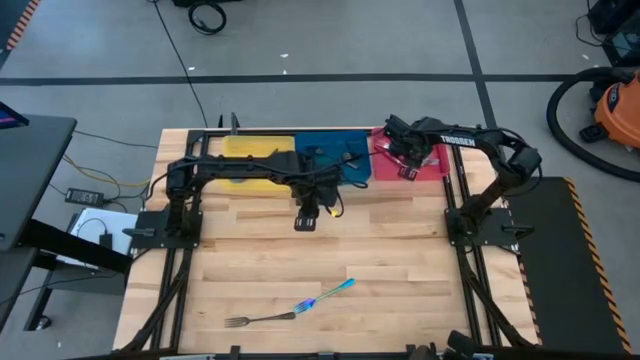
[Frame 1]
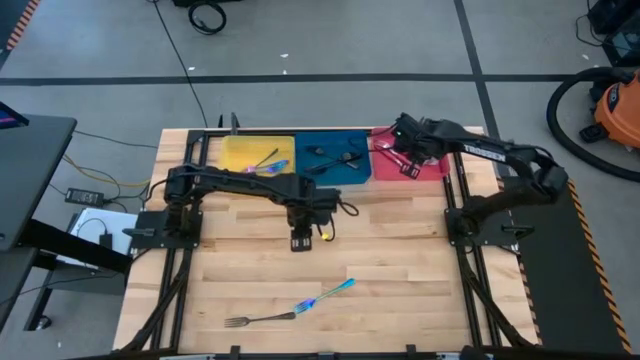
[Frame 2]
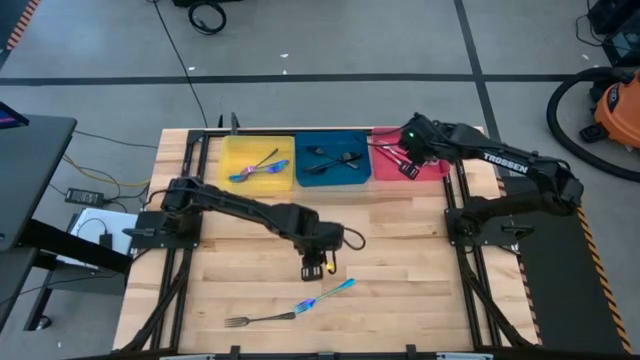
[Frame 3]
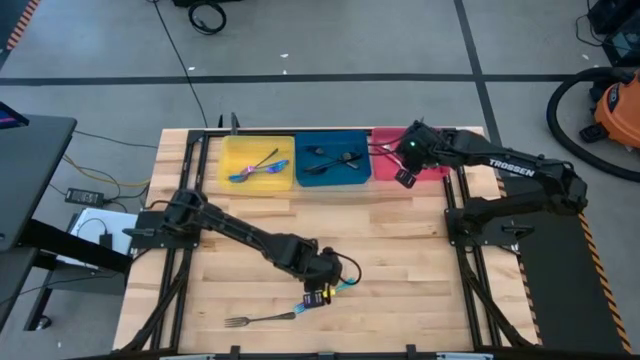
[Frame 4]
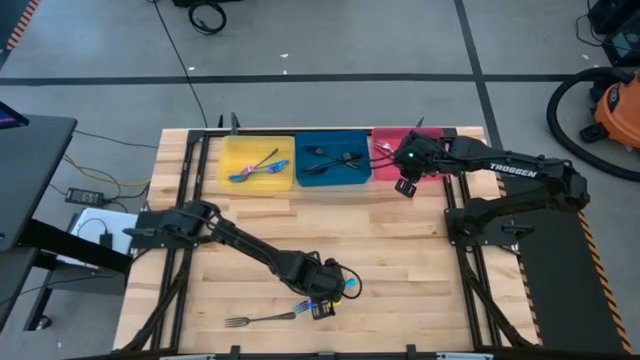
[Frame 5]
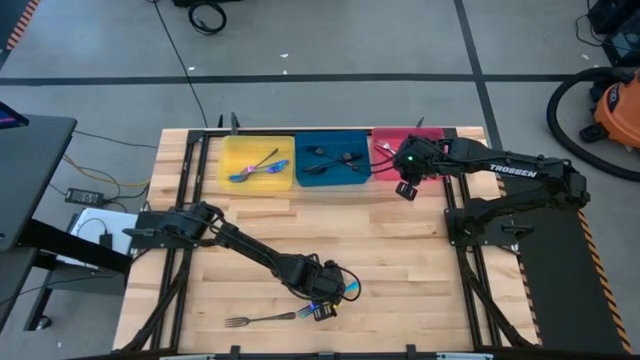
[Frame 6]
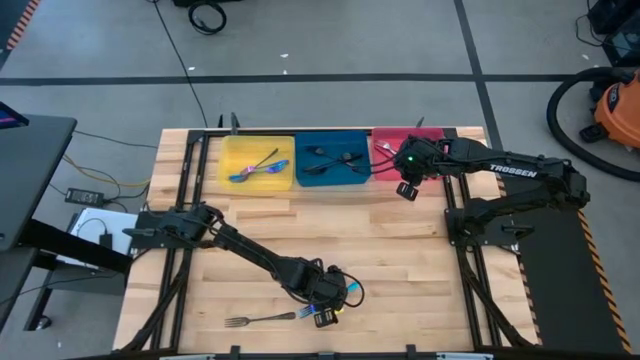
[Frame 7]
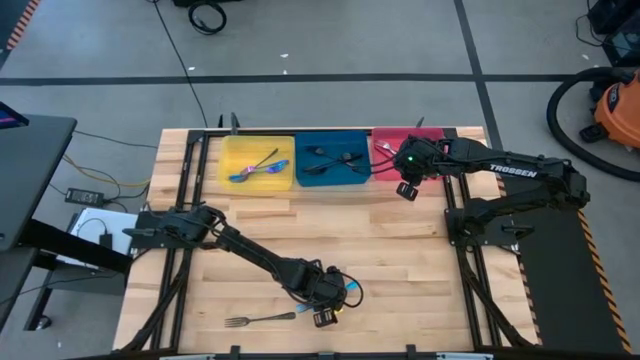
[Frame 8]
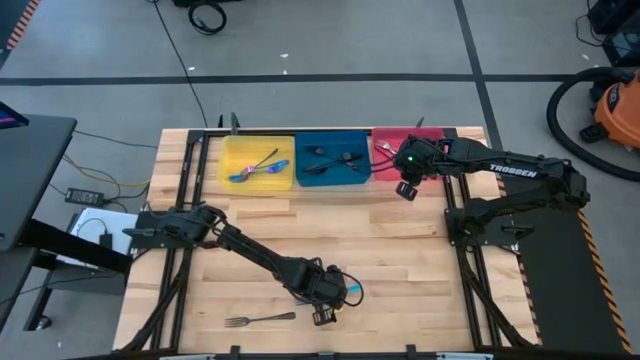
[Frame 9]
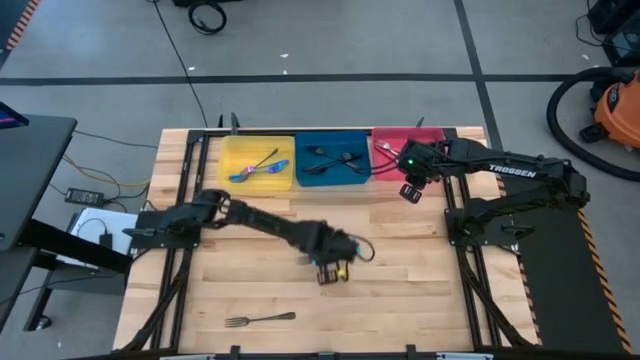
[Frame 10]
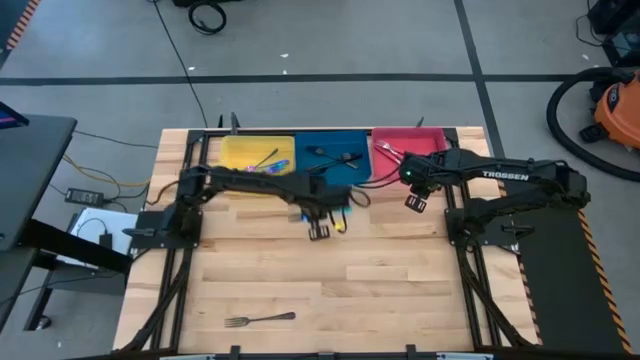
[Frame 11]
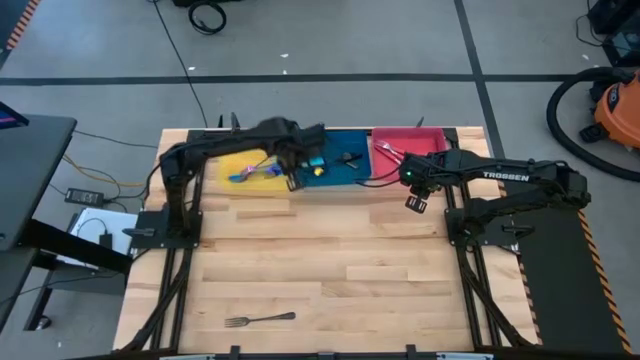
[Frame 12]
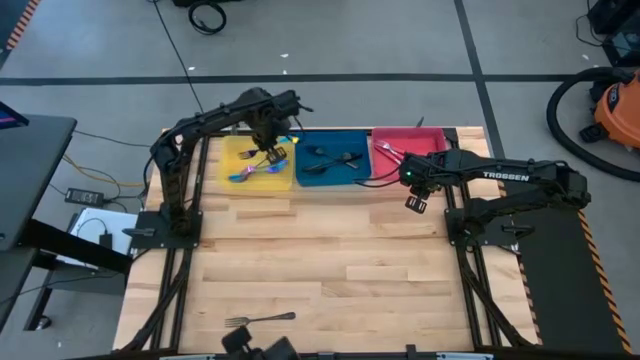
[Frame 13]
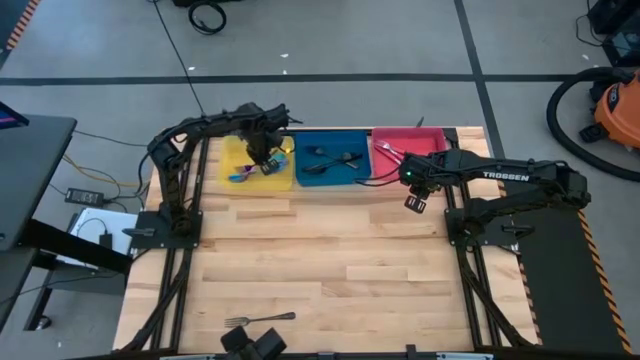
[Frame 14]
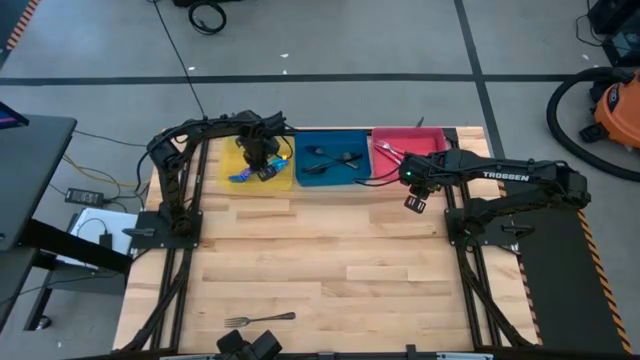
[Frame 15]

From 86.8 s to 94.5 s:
Task: Sort silverware by color (type)
Put the blue fork into the yellow bin

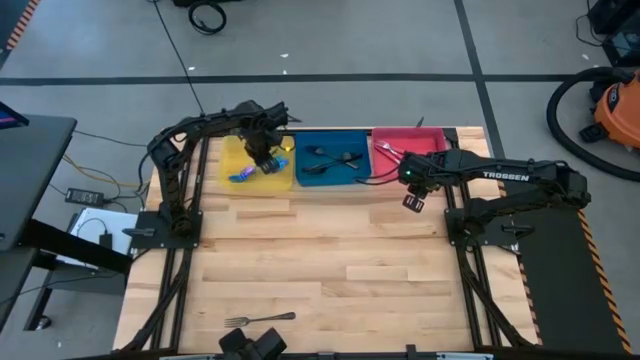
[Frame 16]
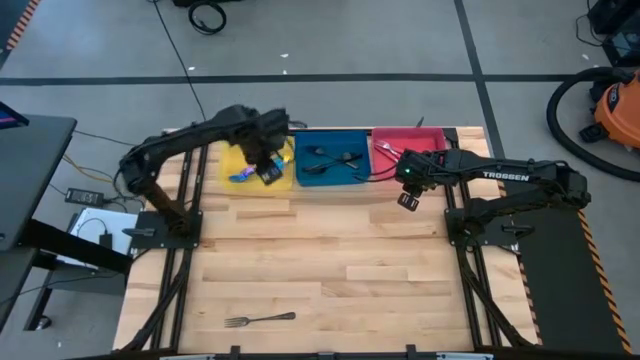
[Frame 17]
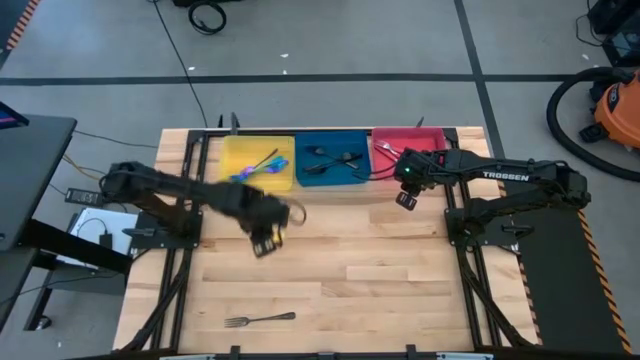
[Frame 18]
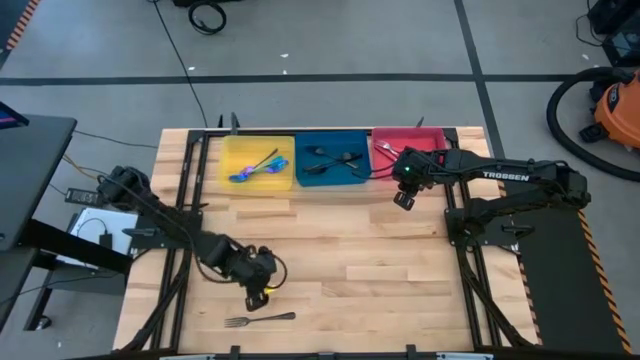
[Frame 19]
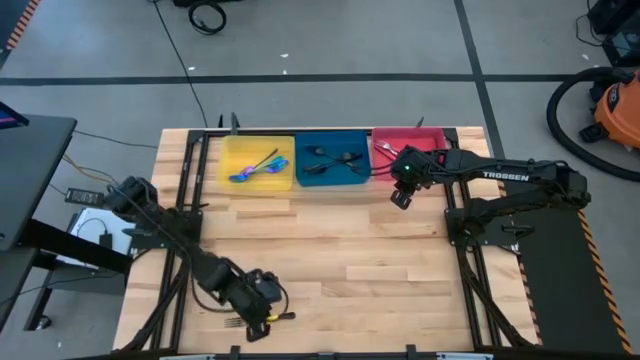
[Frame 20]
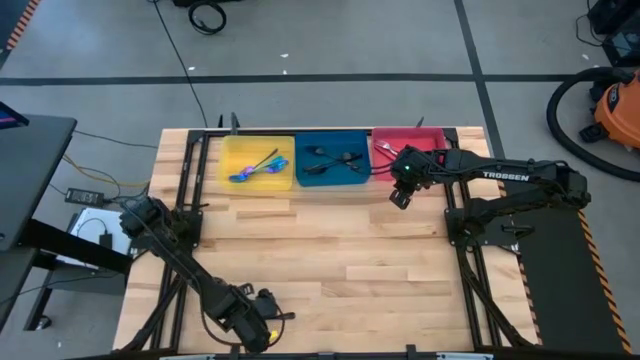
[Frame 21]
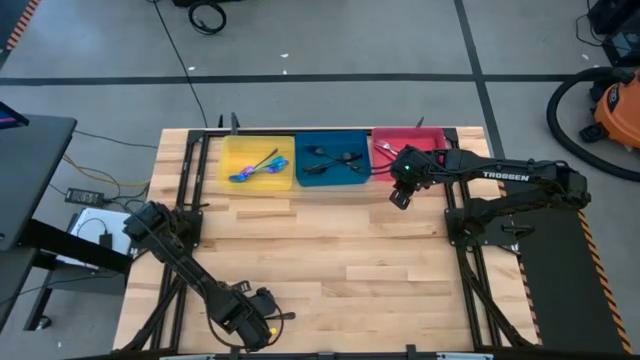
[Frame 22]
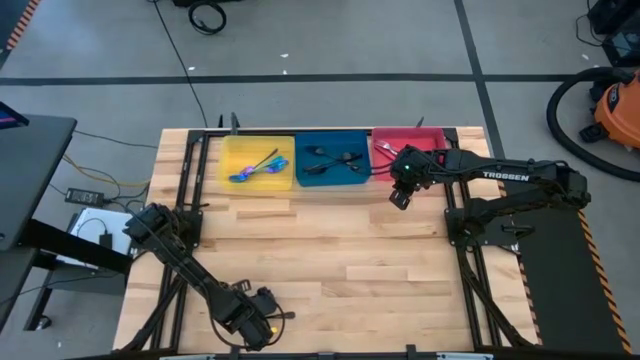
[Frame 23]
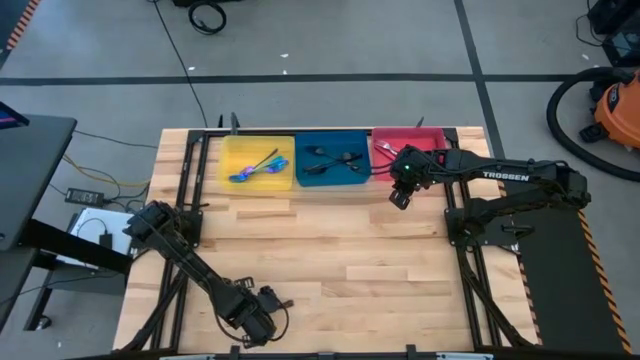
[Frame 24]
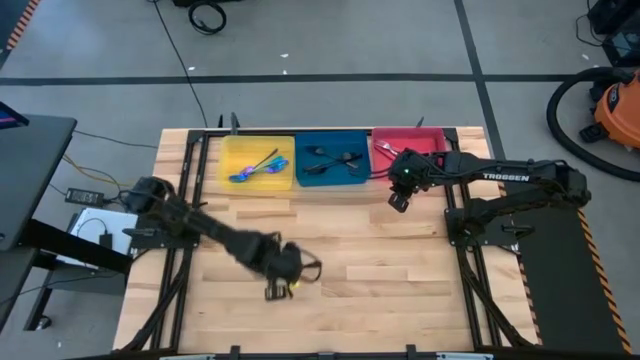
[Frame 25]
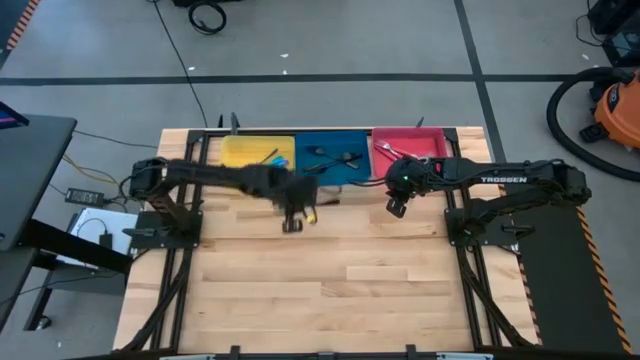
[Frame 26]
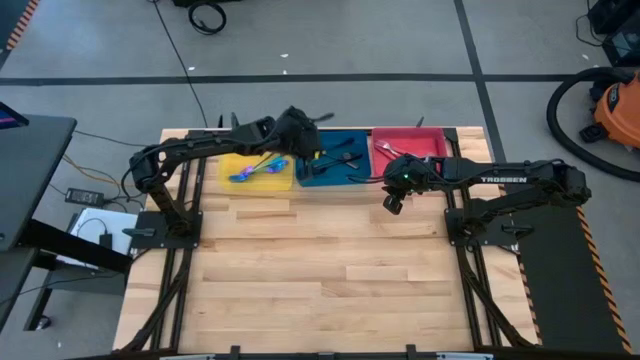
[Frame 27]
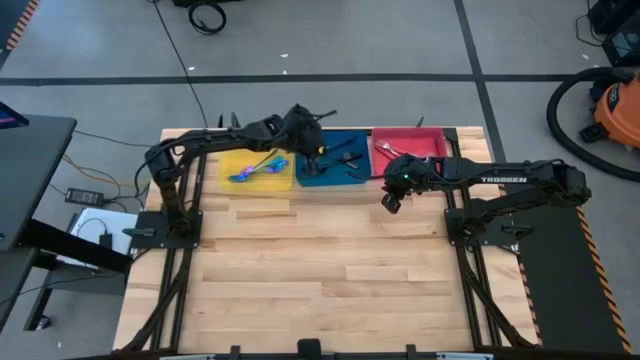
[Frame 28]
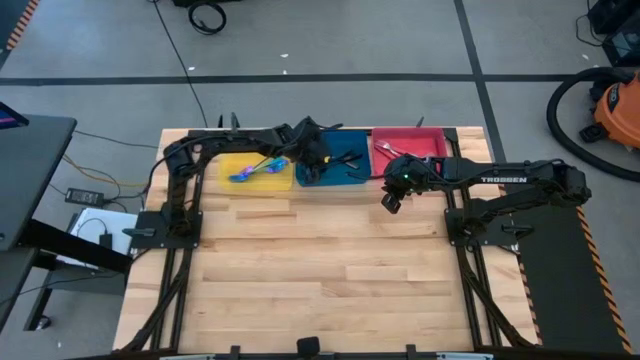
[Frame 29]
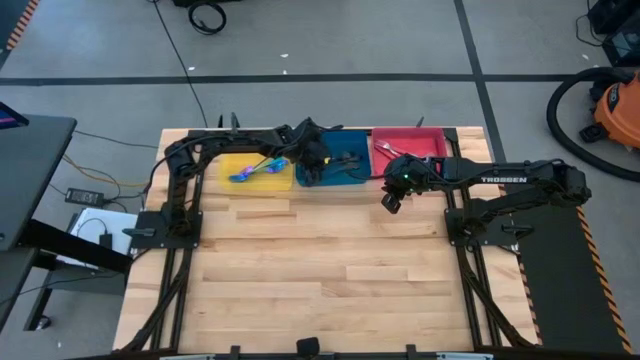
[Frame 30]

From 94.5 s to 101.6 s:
Put the black fork into the blue bin

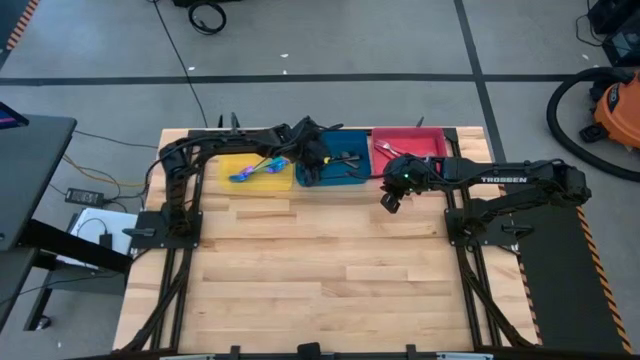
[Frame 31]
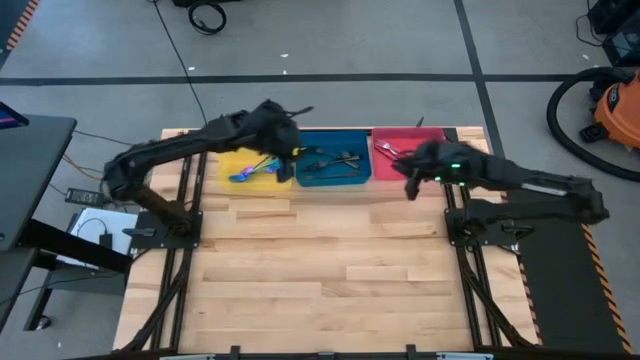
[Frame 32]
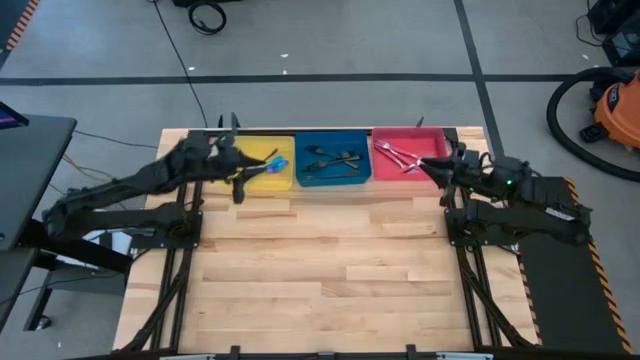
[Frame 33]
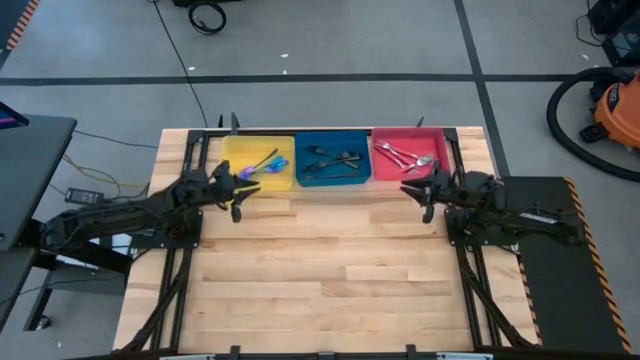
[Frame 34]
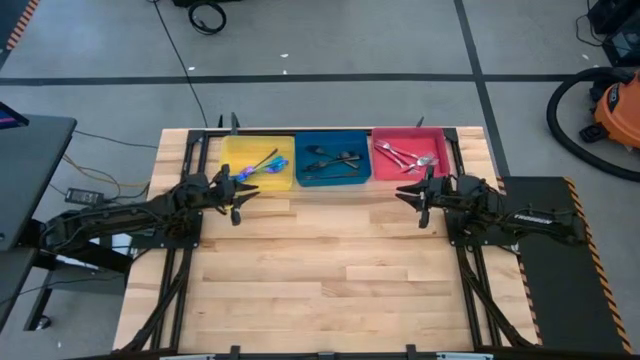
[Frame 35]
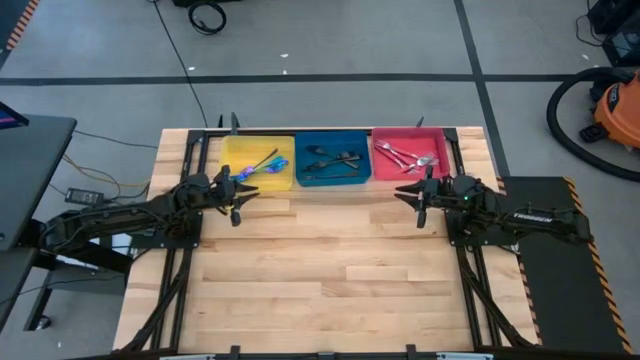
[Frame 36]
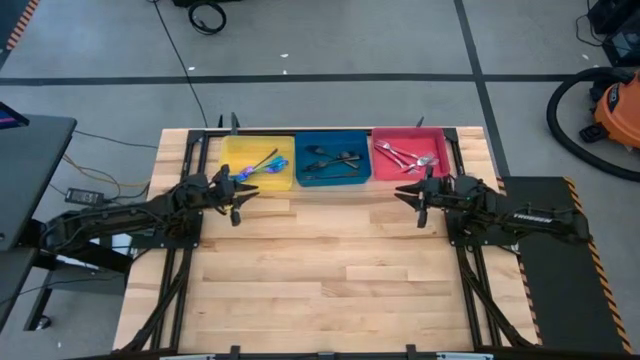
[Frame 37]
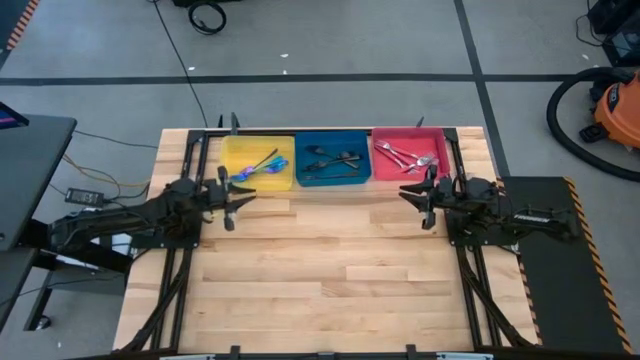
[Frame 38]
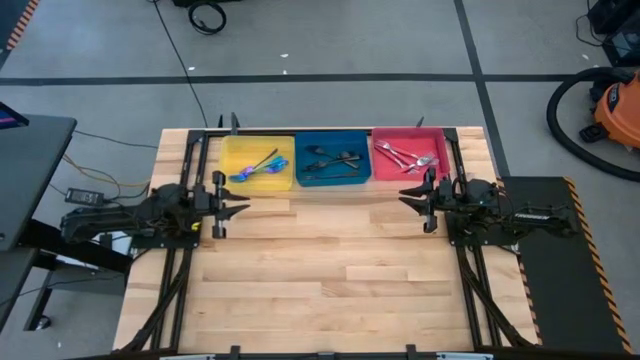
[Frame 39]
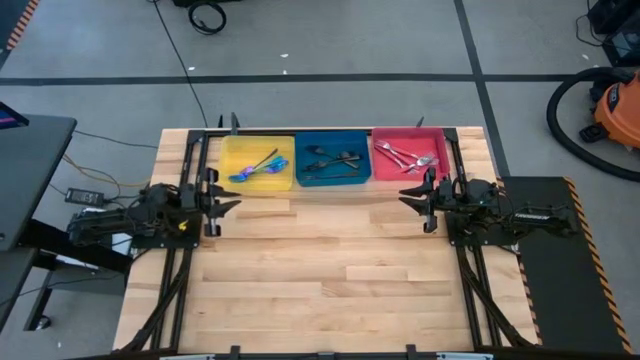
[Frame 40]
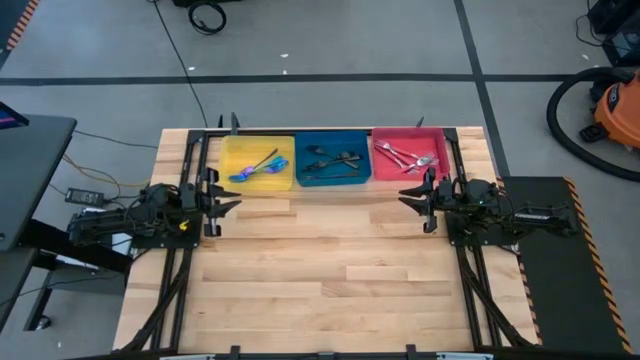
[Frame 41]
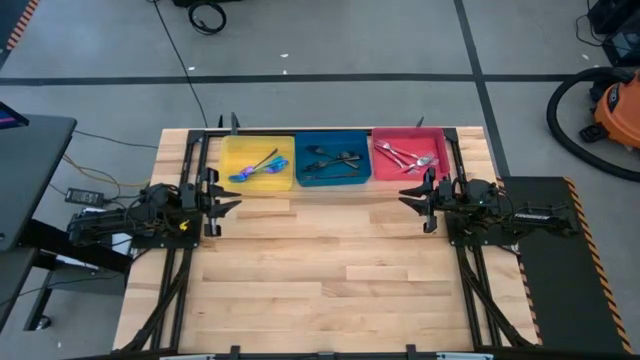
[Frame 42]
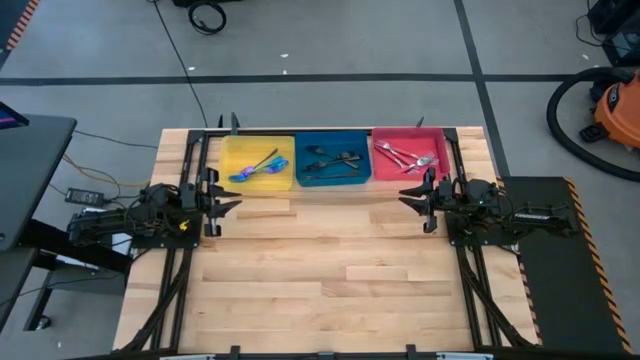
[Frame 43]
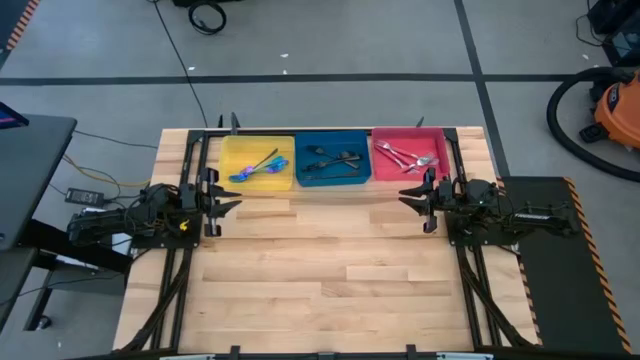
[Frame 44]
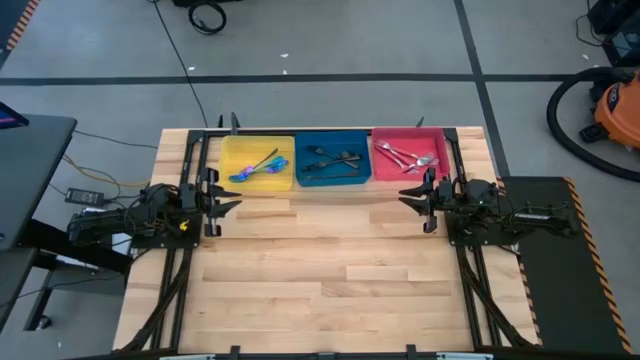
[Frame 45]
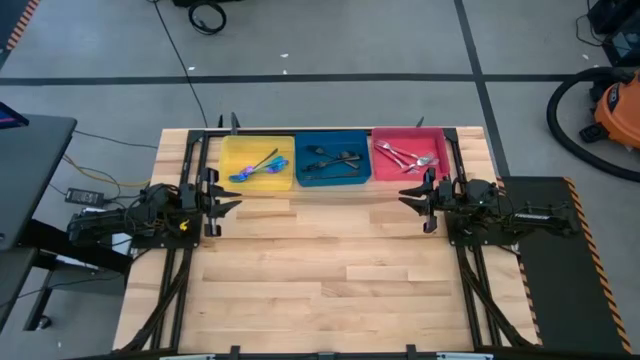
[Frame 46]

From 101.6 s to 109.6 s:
Return to Home Position
